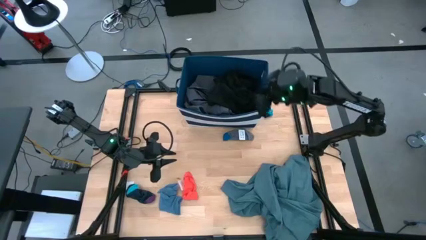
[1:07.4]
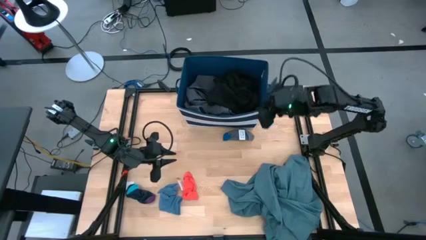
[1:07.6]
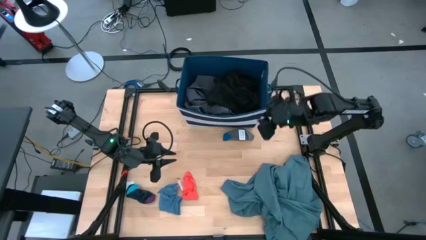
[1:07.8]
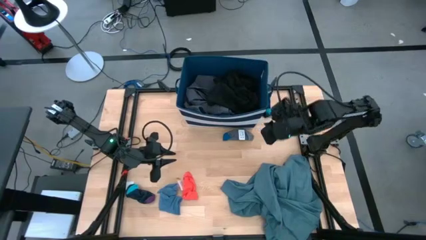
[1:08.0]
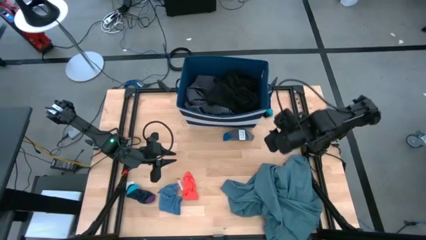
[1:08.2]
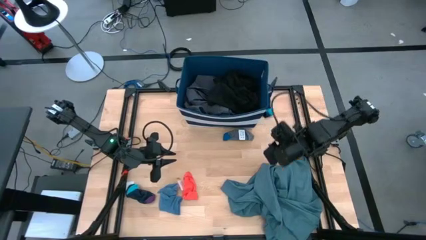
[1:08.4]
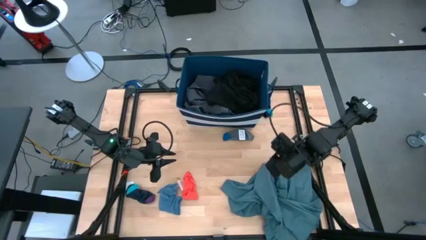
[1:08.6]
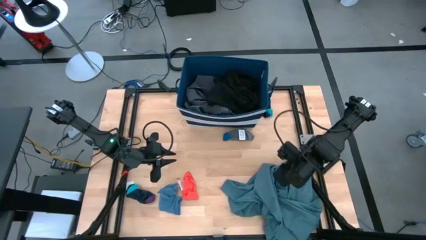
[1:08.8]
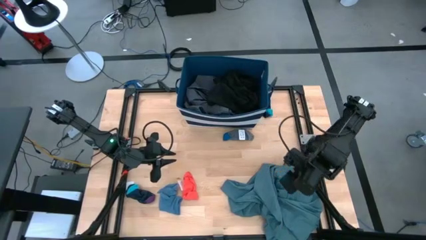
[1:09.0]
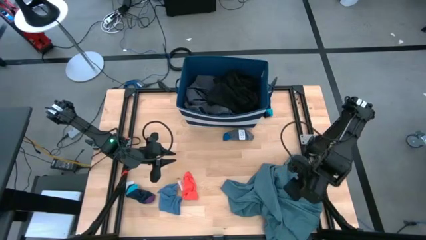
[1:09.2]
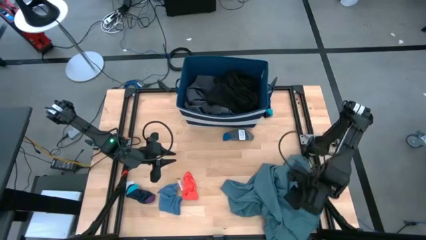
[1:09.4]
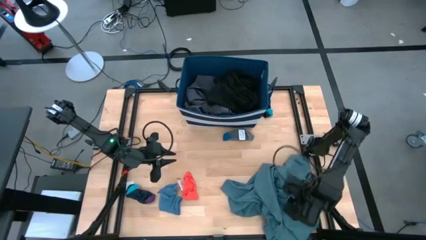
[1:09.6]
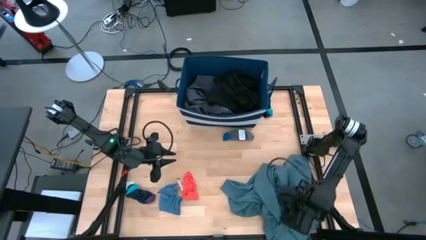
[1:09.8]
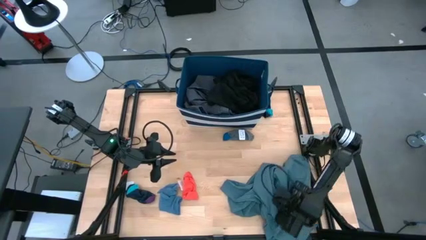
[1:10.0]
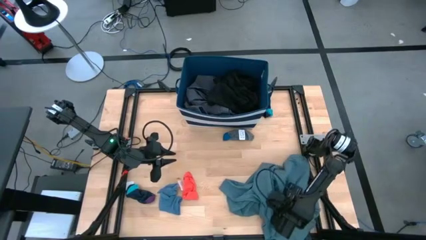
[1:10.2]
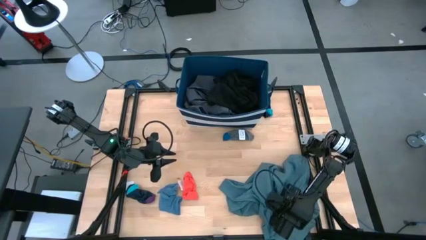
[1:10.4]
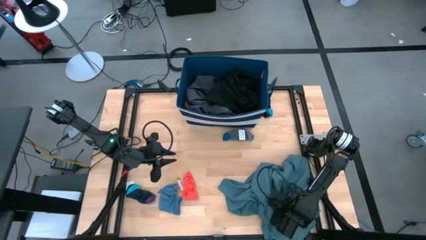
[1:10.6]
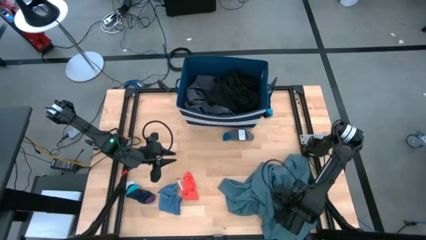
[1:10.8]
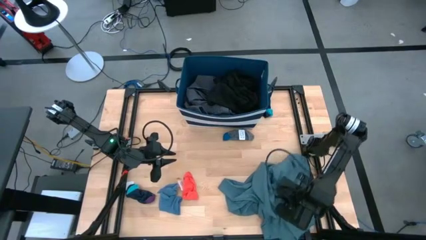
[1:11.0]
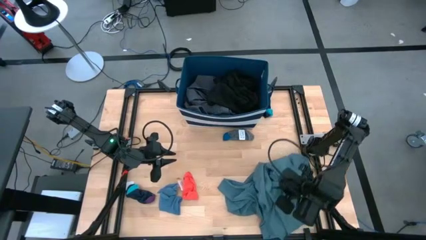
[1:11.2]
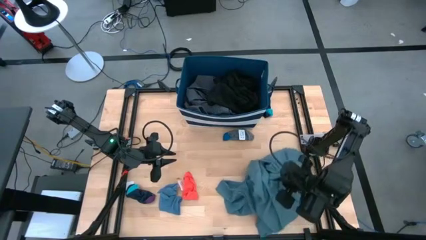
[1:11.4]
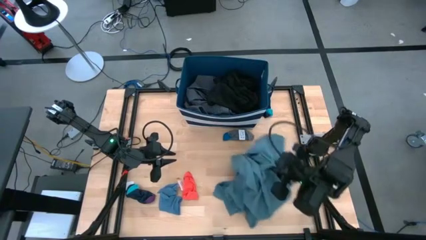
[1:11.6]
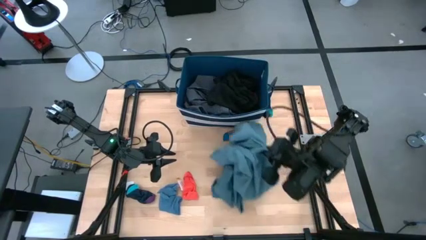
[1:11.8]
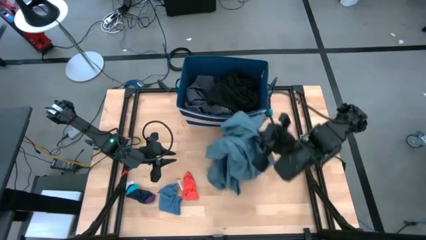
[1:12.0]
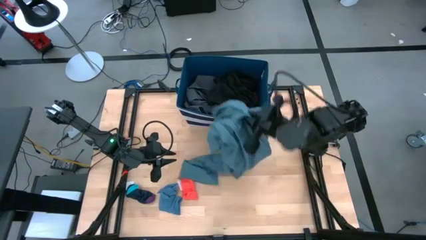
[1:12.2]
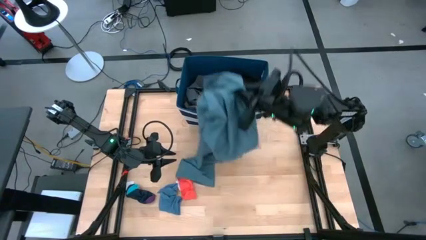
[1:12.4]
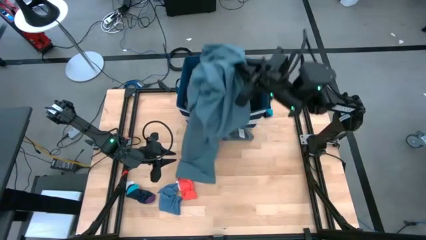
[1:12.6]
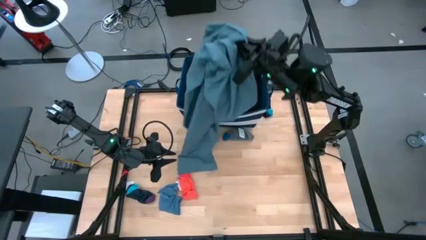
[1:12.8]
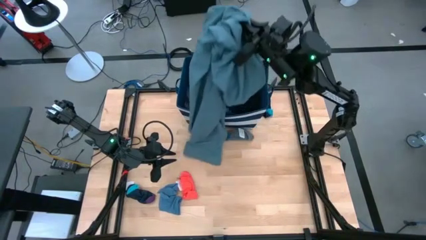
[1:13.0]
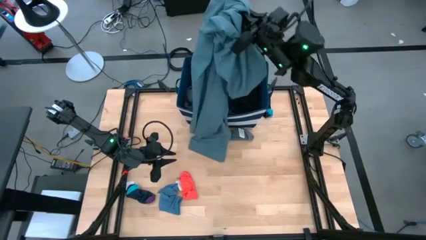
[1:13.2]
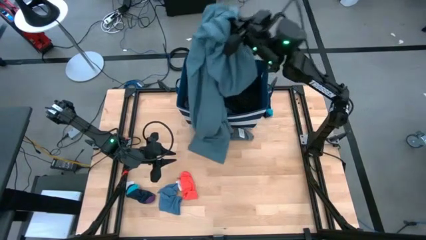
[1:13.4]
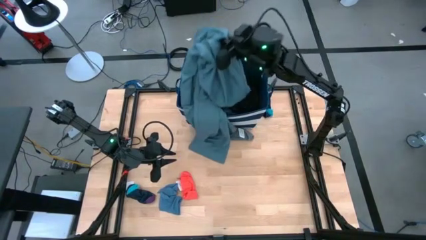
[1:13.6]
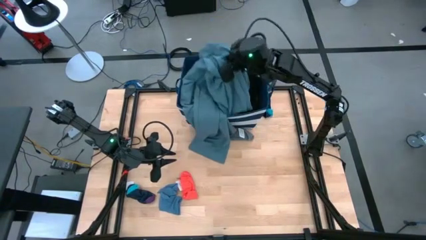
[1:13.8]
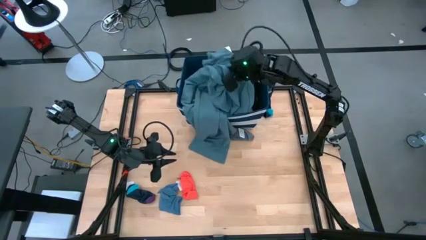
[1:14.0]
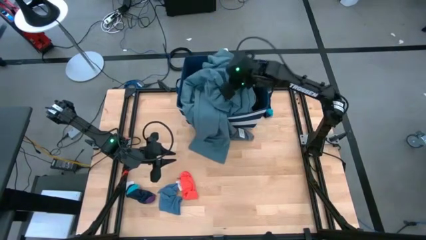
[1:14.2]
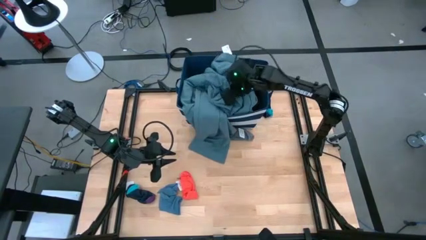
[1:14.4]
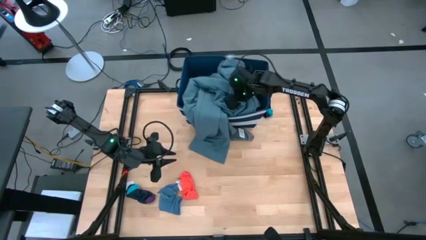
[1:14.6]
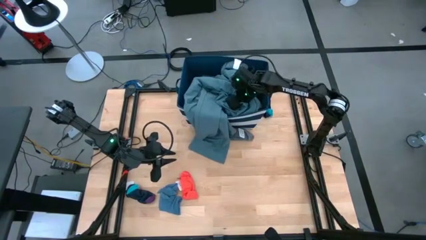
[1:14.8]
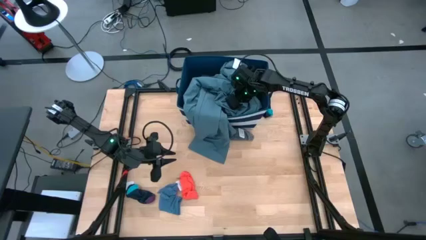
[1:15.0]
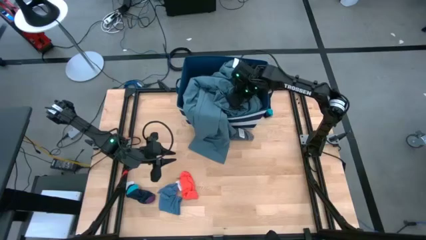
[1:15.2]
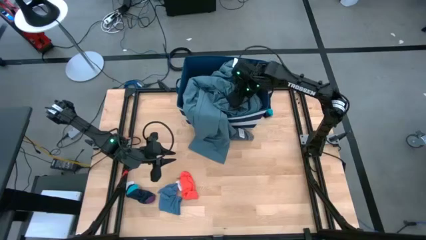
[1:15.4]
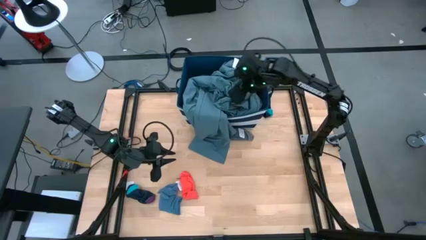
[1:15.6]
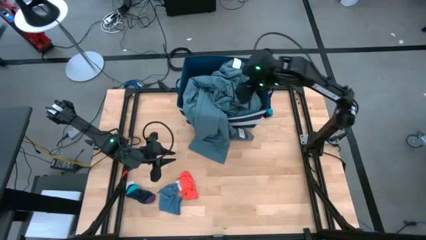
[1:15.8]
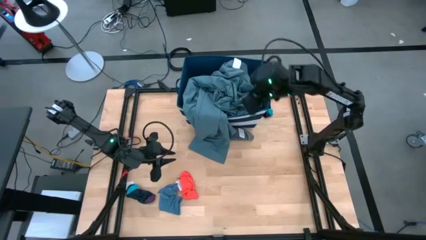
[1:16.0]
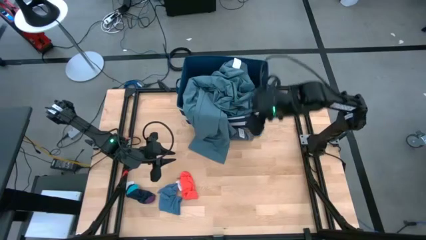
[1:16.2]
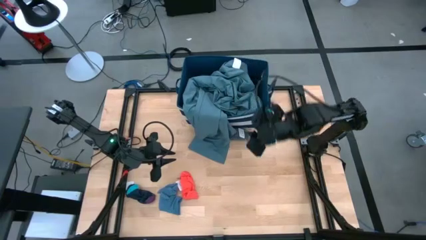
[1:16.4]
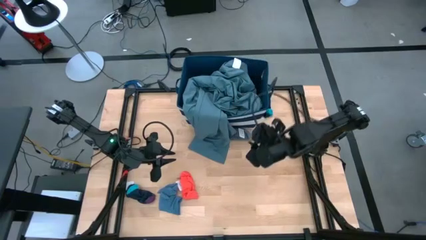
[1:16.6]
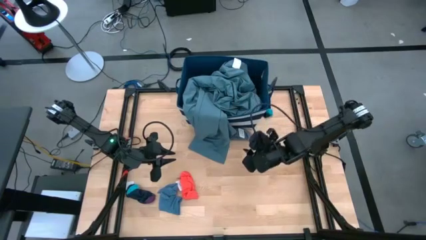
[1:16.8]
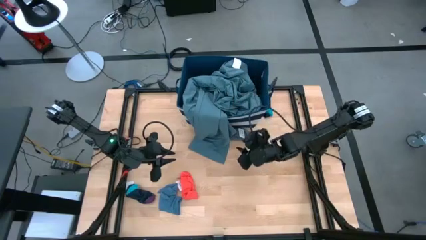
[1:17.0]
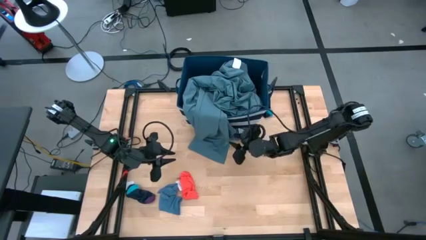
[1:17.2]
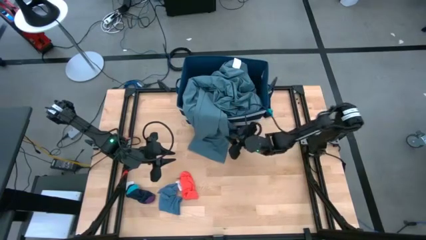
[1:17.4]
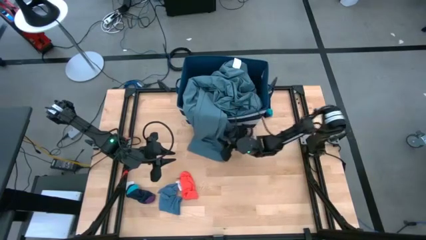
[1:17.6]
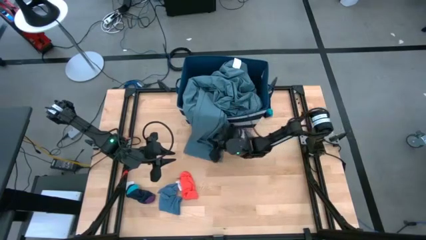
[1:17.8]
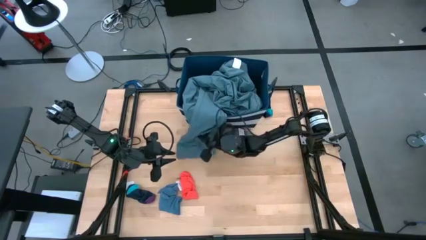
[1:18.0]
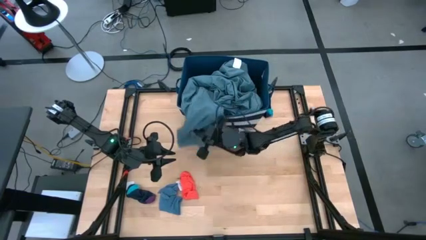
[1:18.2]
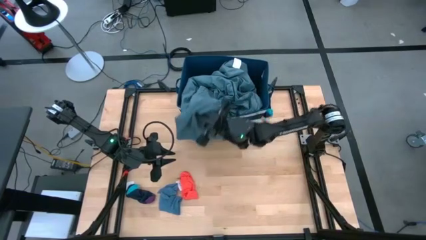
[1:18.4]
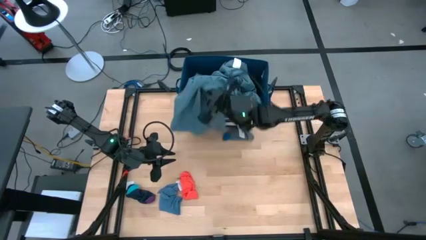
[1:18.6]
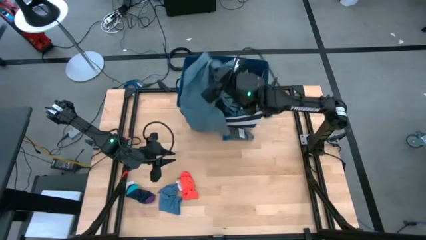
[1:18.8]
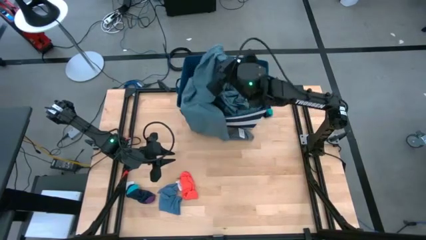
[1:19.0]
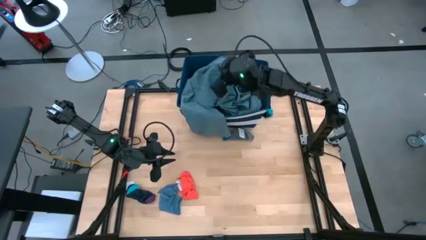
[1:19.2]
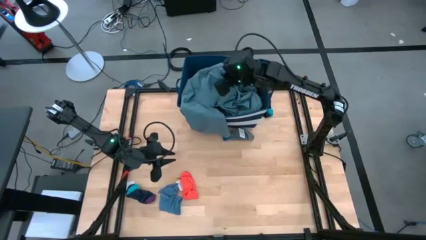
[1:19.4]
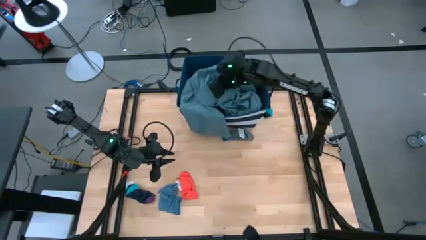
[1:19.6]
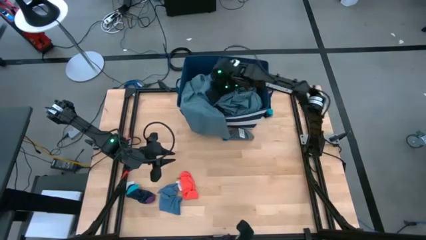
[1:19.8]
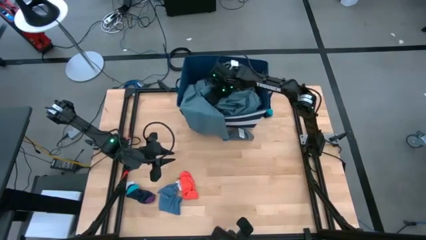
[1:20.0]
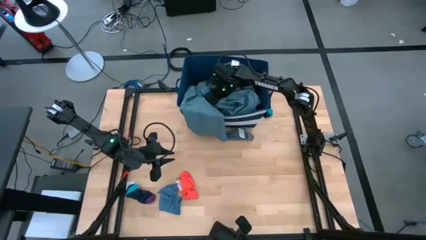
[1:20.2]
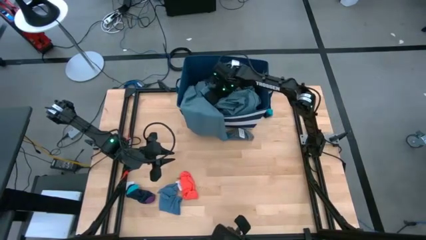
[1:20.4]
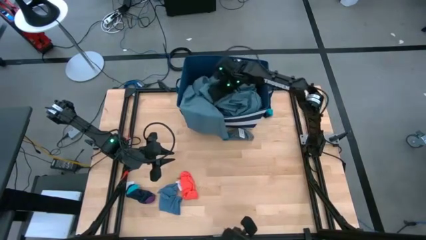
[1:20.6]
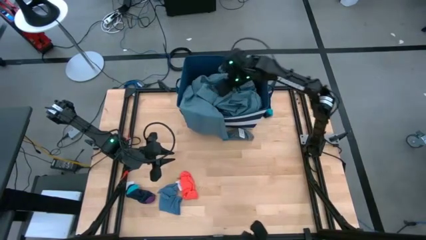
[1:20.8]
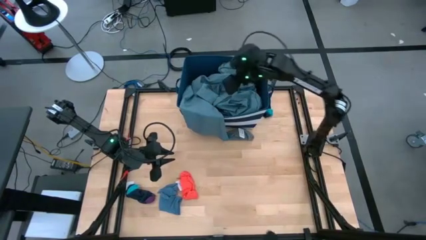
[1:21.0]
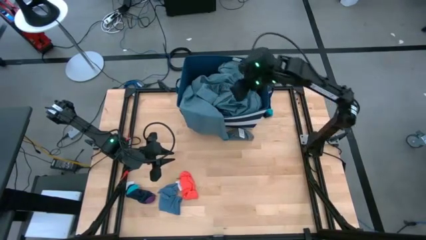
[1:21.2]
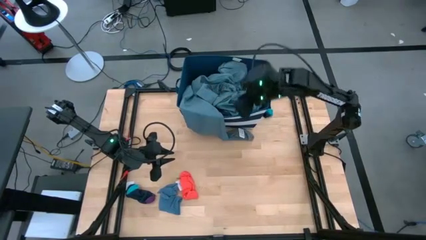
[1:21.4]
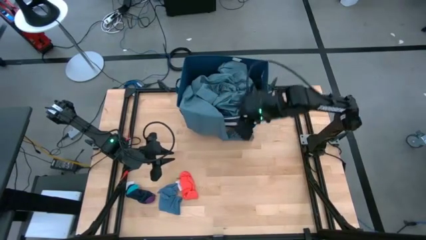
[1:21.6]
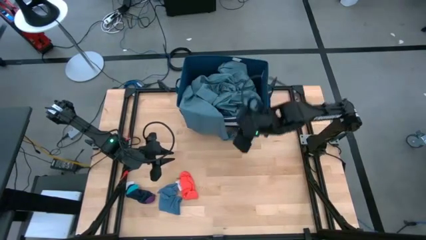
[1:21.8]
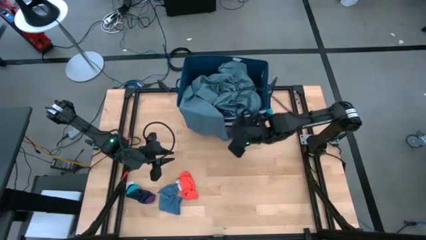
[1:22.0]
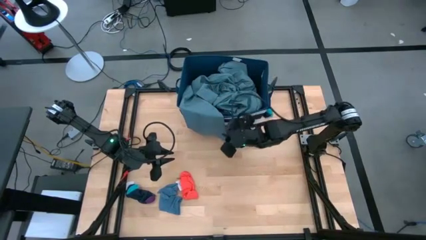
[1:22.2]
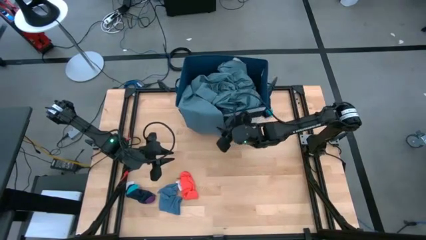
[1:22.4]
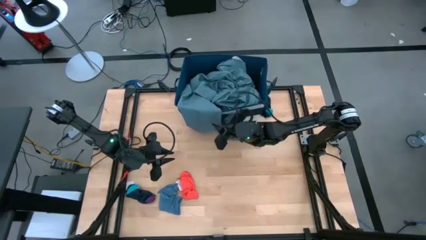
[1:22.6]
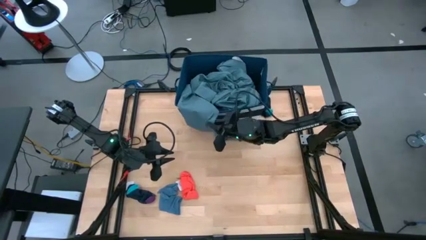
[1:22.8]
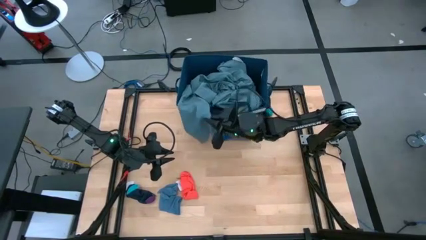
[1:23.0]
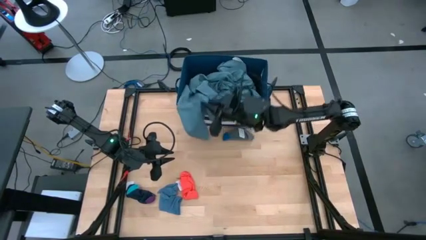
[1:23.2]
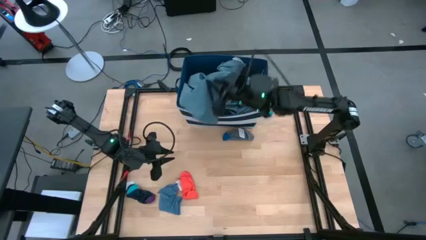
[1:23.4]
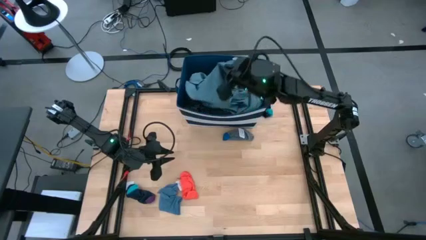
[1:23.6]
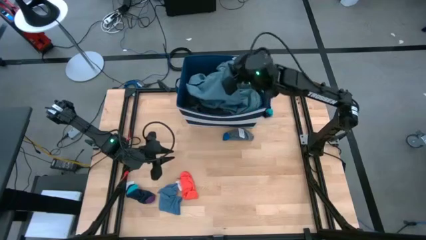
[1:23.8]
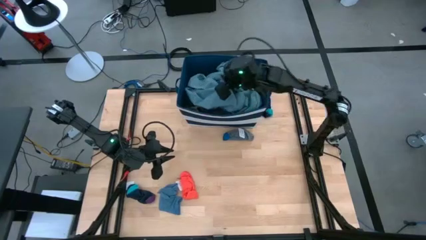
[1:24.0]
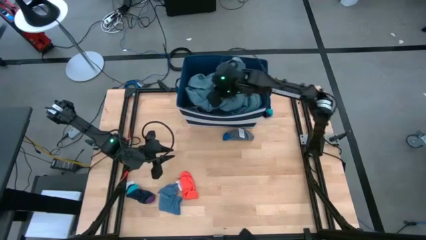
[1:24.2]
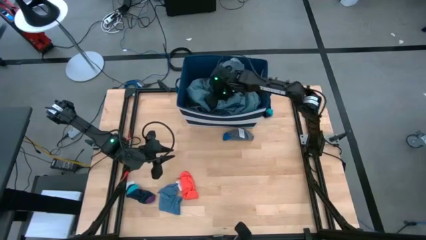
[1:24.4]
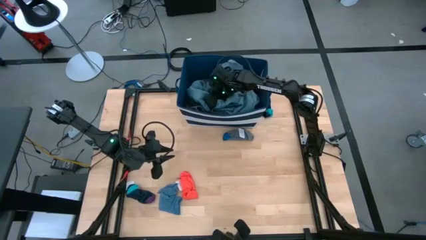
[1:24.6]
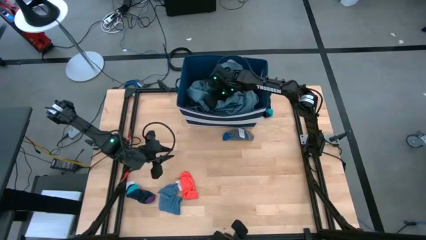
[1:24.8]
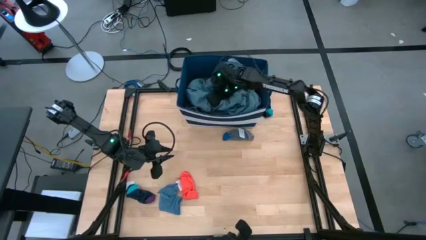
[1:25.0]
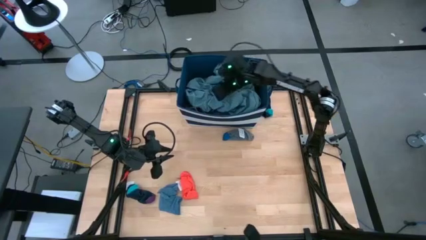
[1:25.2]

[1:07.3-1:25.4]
Task: Sort clothes
Put the light blue pants into the laundry organizer
